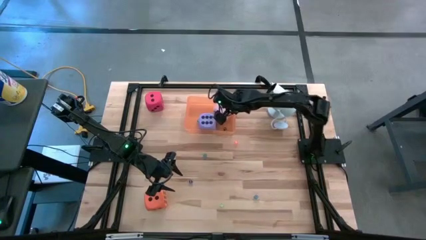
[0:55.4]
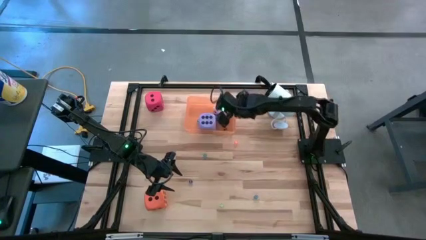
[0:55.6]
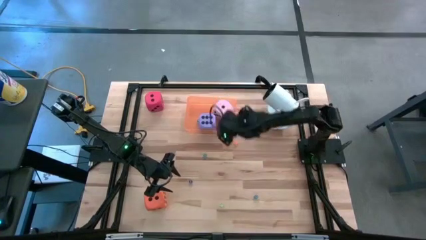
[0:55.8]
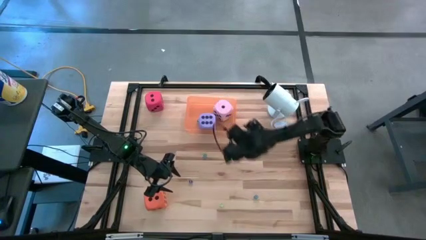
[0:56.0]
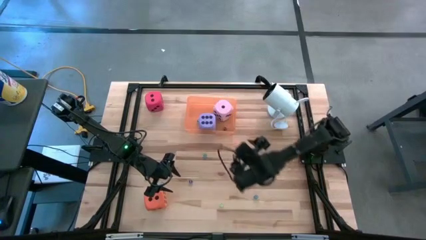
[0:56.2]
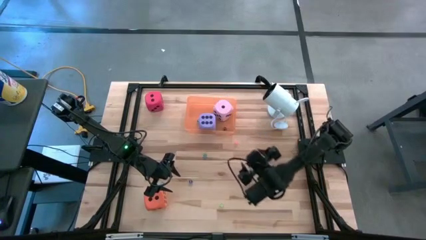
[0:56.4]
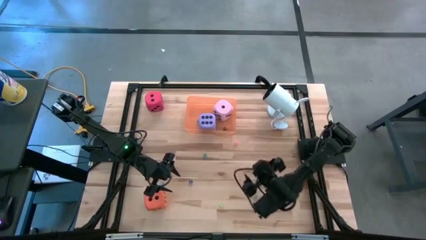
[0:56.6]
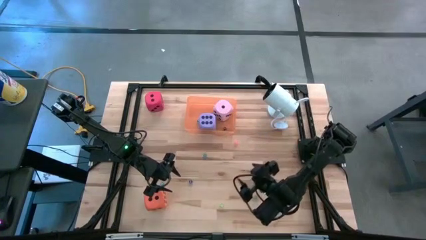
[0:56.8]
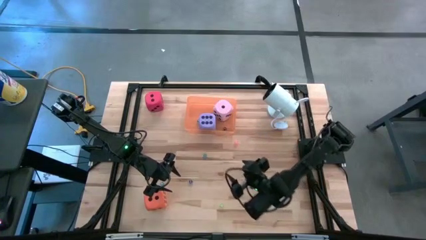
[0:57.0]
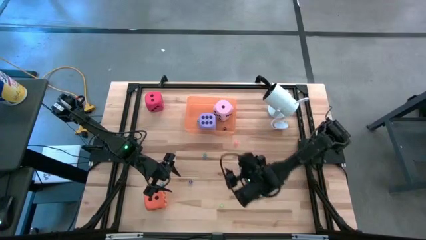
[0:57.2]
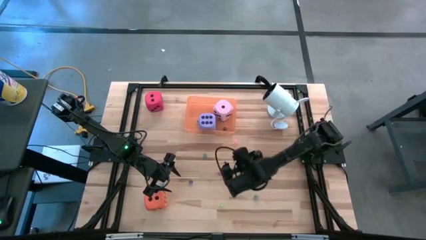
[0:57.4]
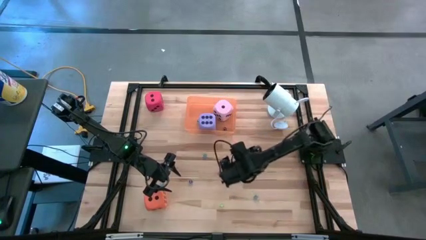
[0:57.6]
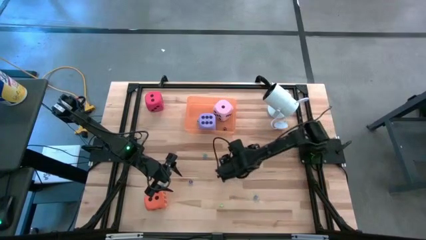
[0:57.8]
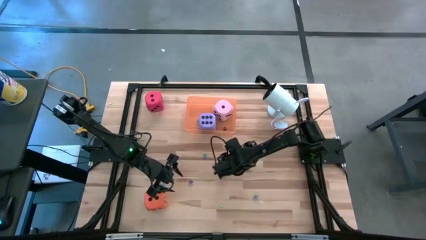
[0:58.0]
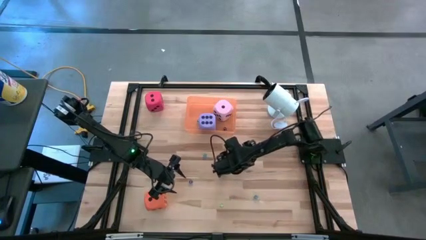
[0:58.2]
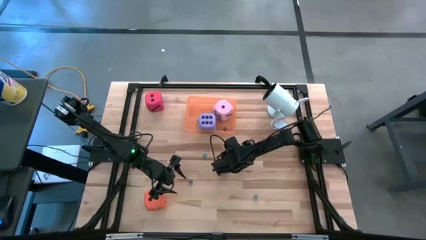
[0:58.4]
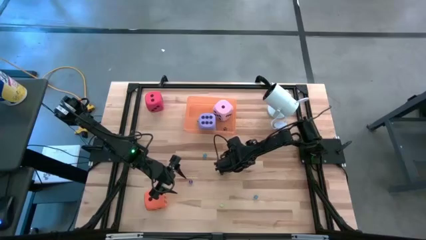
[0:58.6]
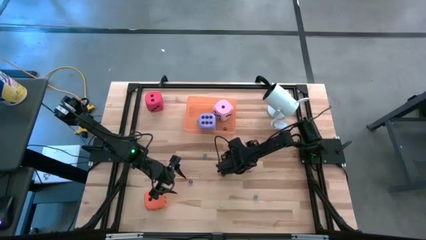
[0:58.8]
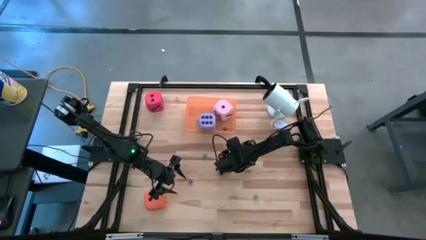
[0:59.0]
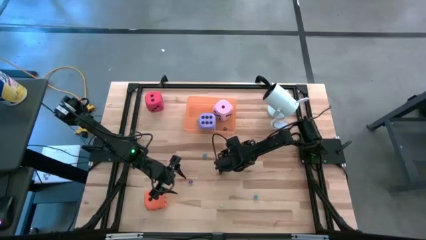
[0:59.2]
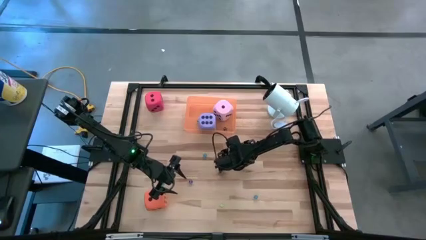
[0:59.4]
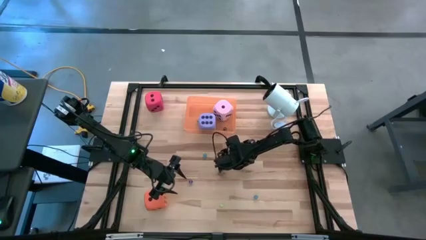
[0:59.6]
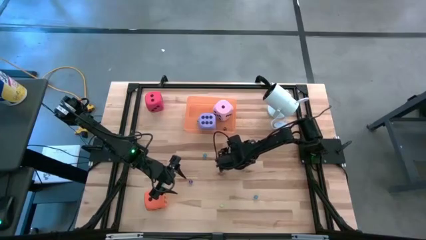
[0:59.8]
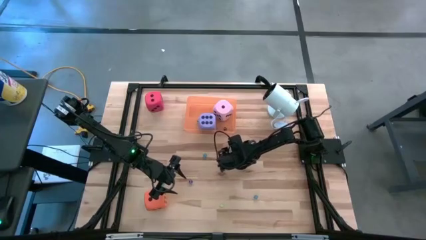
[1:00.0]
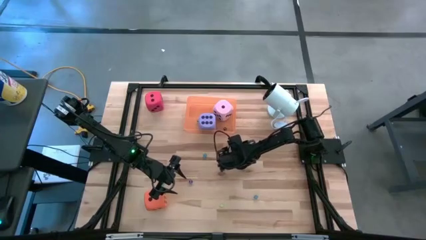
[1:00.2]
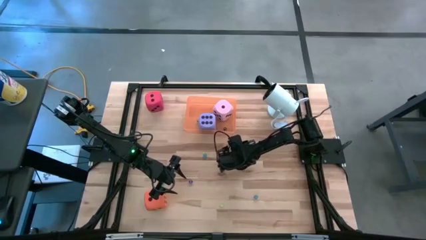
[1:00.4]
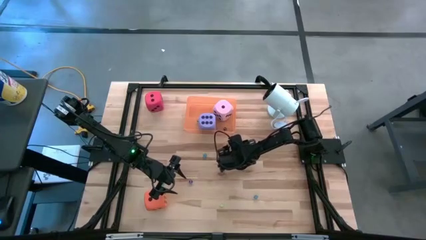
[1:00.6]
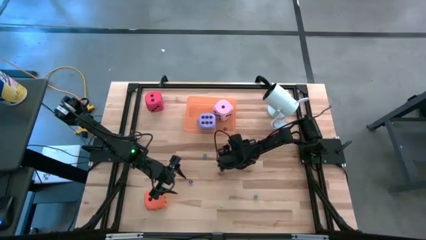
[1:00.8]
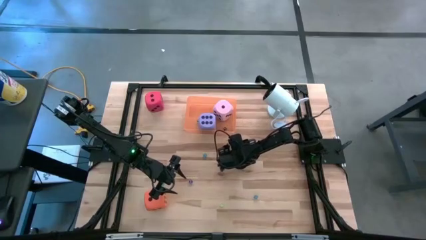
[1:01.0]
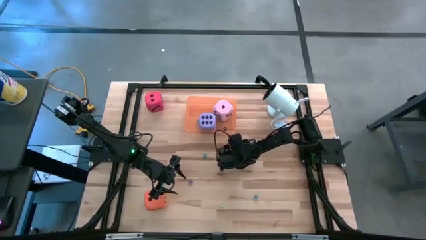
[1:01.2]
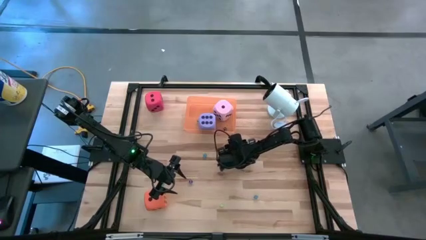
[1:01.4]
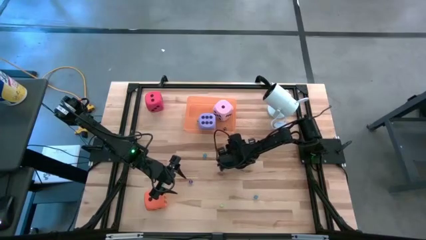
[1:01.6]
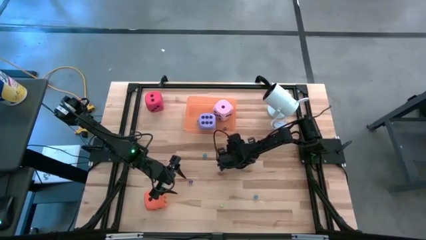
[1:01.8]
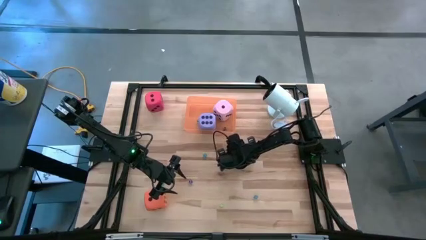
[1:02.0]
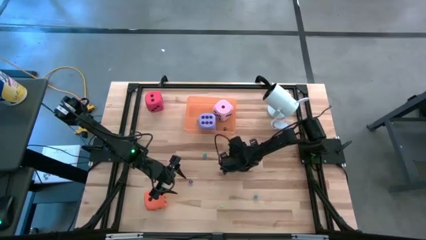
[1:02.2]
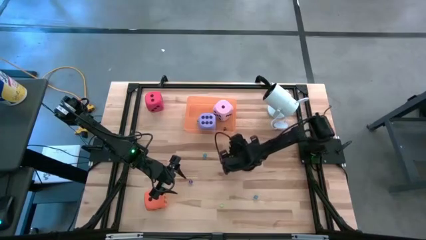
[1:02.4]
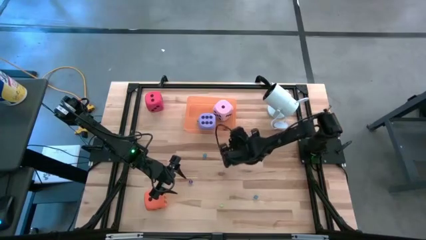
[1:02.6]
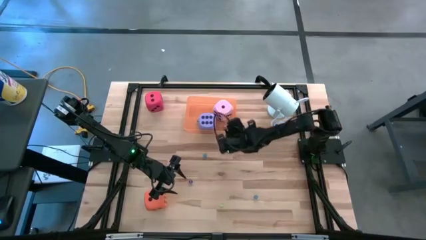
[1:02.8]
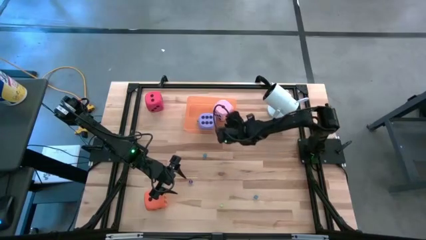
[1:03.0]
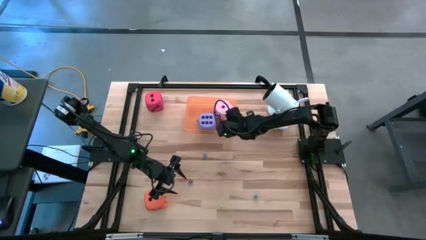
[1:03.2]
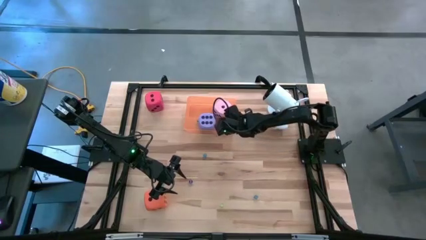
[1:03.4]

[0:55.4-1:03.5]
Task: Pick & Place Dice
Put the small orange die into the orange bin

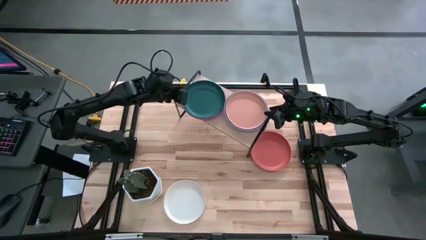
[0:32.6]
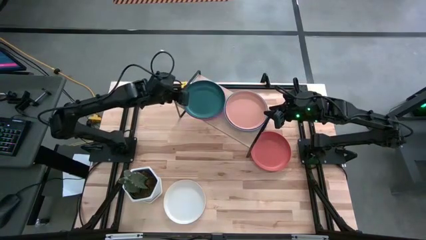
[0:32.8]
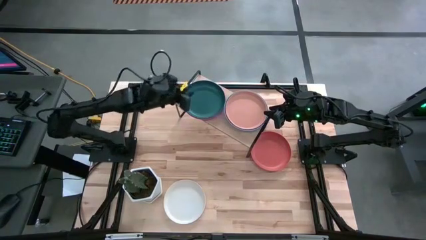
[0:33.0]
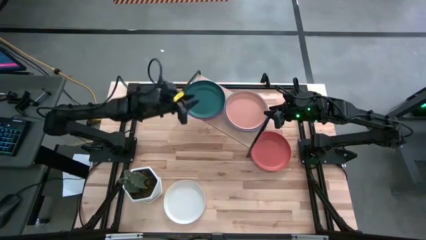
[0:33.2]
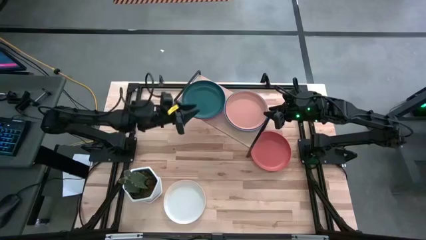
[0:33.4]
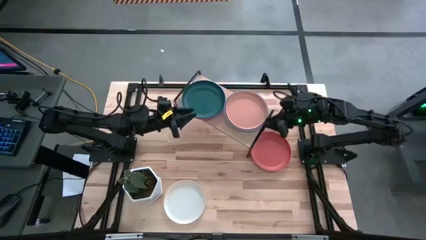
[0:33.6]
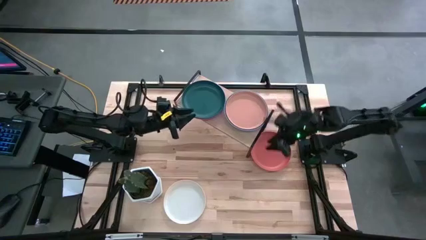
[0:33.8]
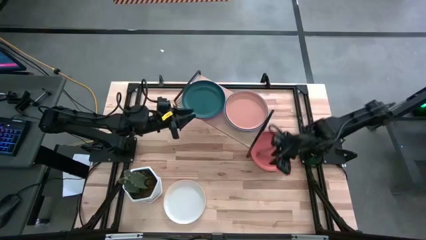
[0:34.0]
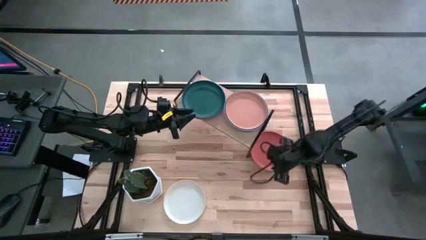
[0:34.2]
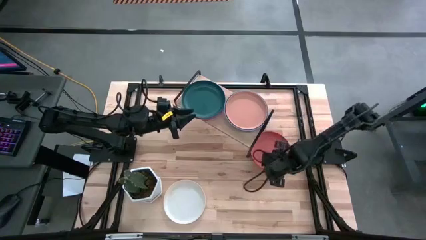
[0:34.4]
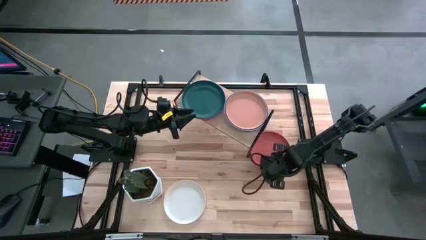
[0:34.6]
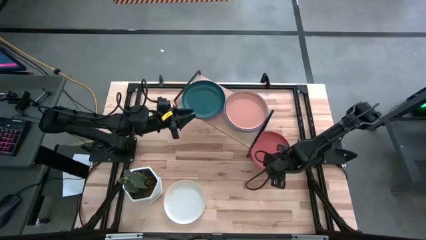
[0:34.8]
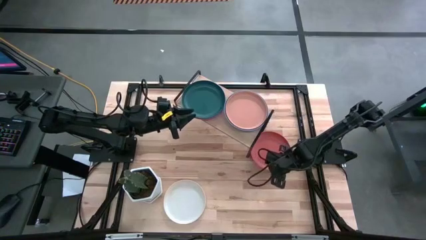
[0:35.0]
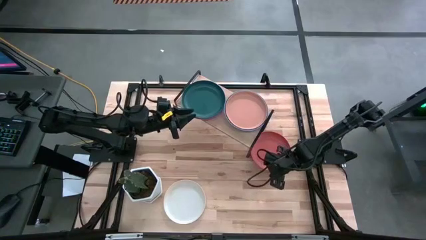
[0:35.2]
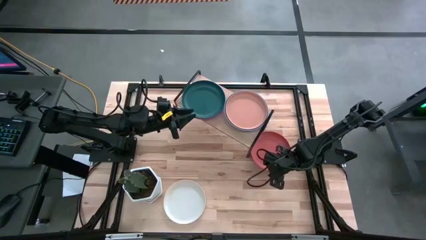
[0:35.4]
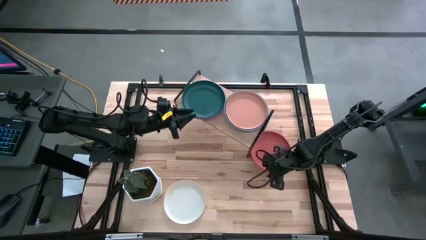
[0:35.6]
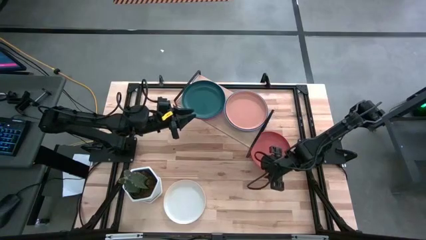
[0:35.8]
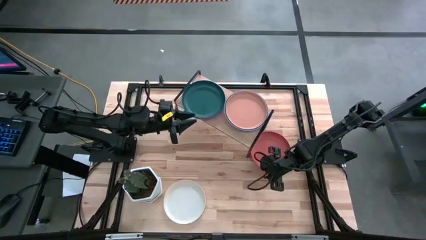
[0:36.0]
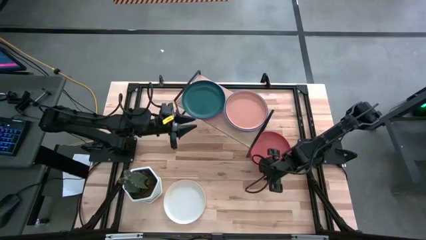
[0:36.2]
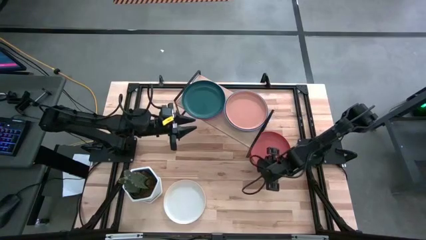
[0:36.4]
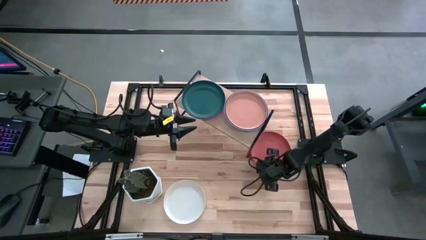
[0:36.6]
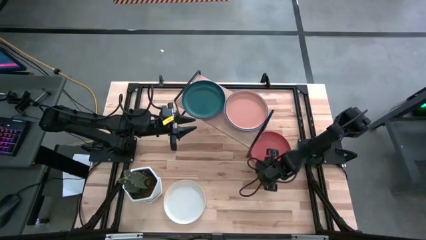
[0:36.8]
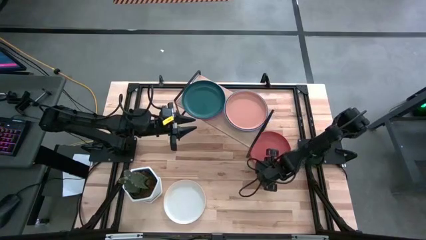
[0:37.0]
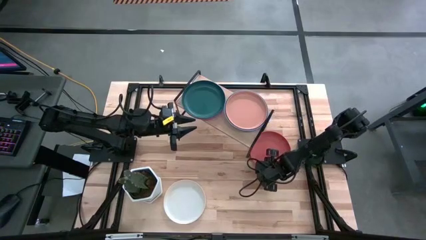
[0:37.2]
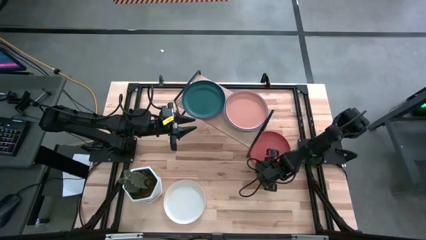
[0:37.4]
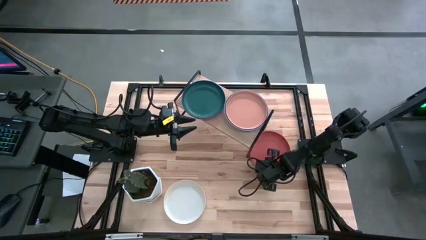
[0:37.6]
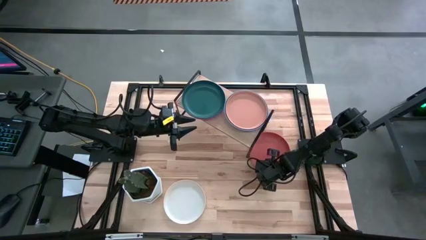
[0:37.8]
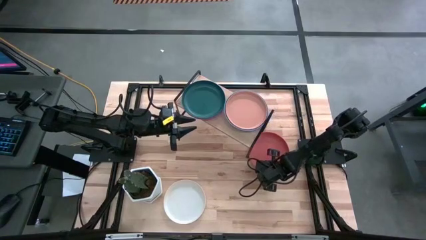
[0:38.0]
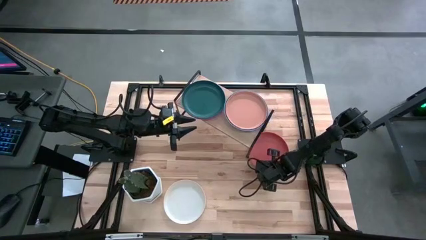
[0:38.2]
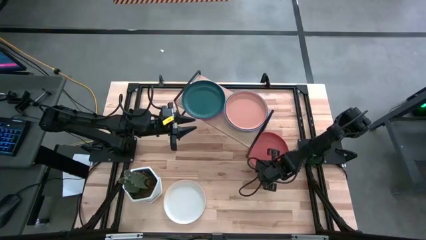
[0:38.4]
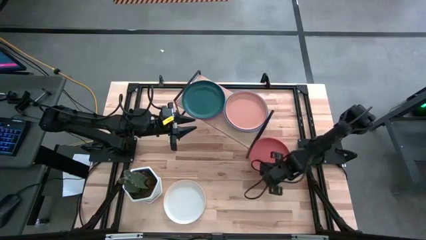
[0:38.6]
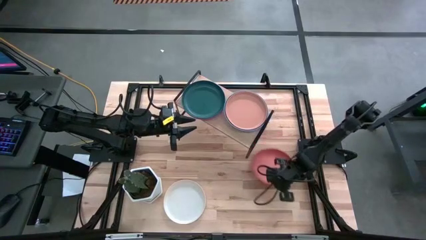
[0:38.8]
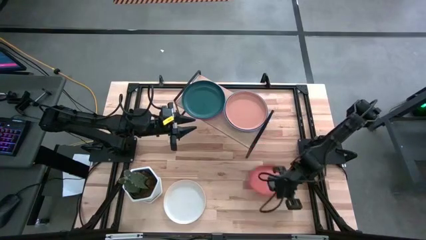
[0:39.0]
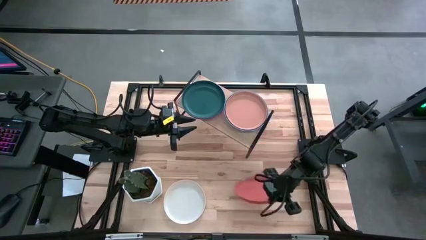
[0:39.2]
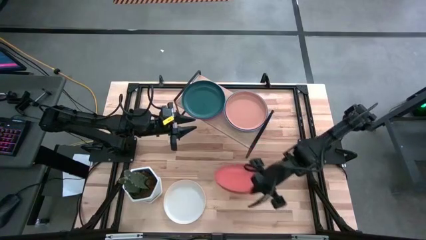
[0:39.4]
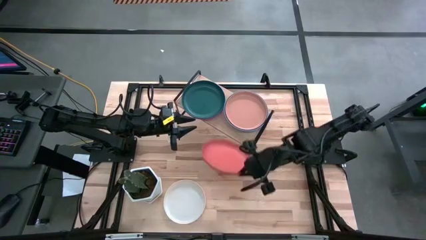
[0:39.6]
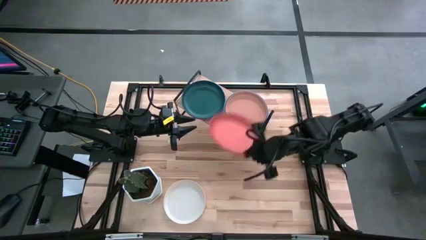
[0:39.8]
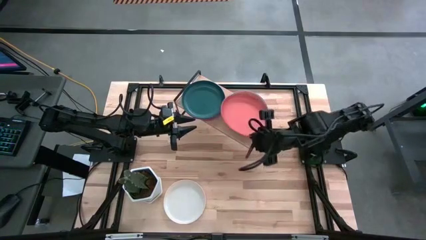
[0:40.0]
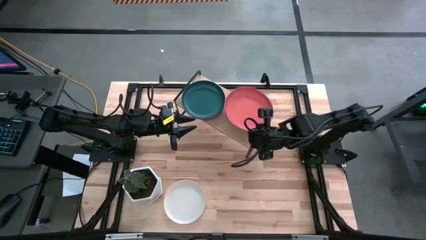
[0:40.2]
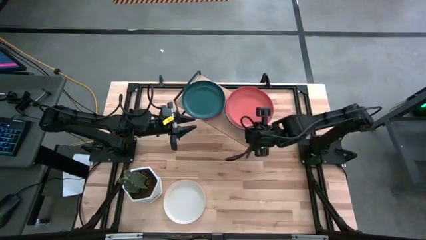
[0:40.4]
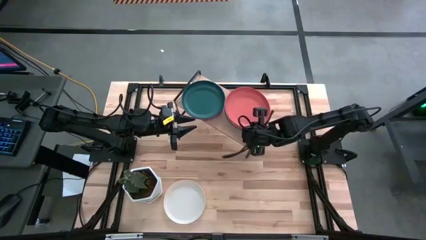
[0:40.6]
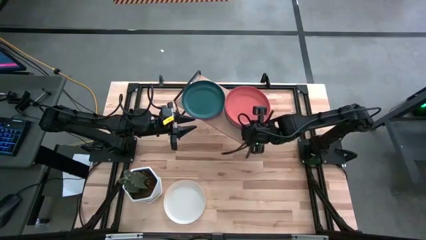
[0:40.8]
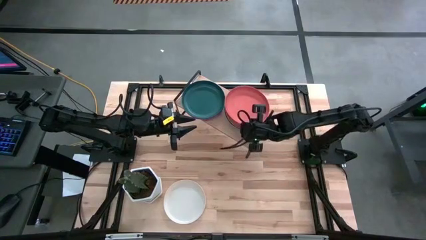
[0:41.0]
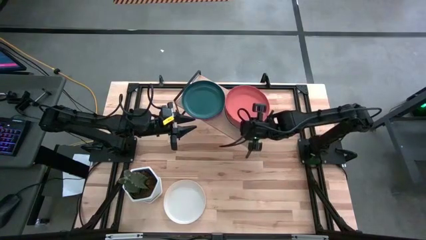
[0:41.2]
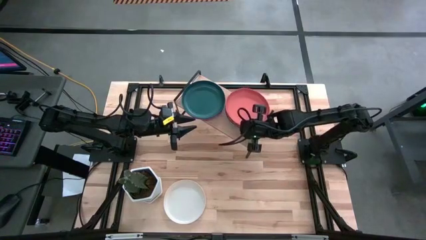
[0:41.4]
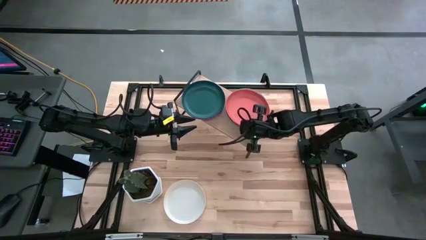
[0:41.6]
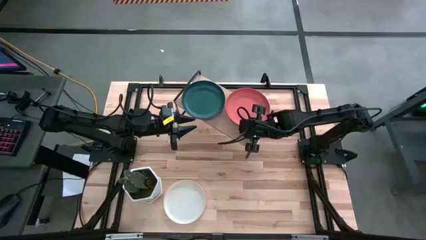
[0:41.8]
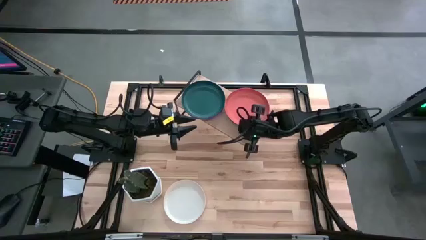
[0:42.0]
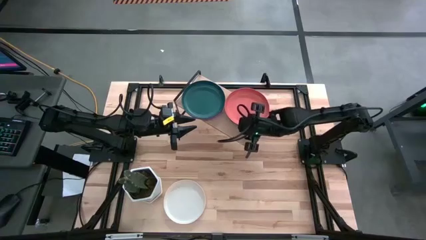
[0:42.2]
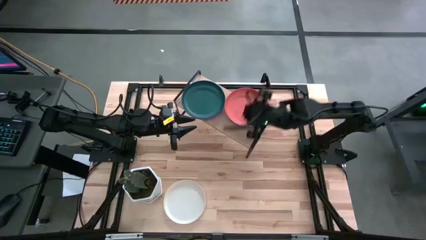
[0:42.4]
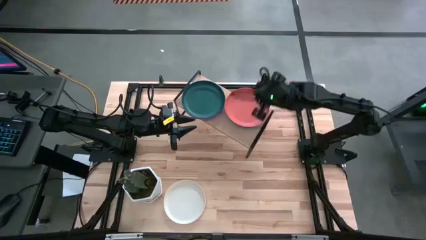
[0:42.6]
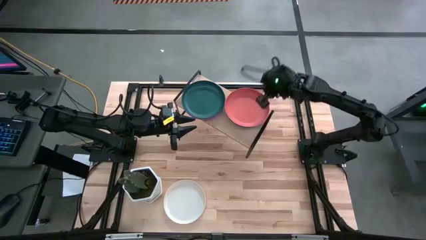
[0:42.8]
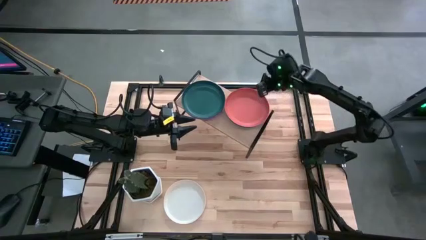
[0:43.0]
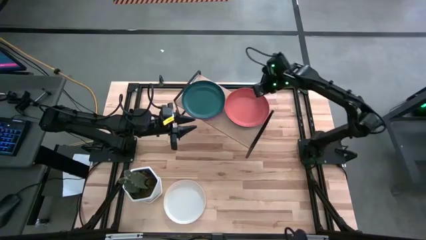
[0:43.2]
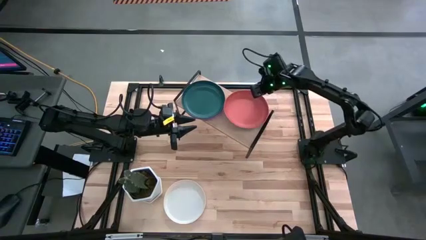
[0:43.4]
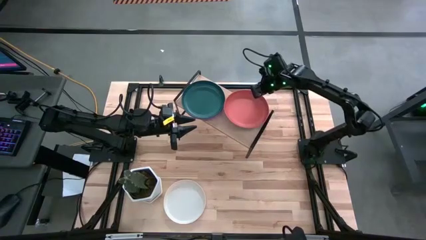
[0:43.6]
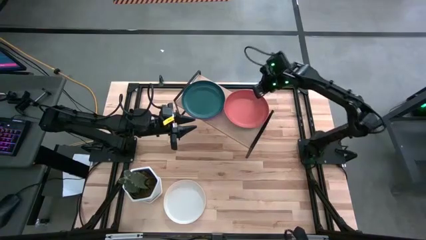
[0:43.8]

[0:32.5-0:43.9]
Task: Place and stack plates onto a shelf
Stack the orange plate on the brown plate
